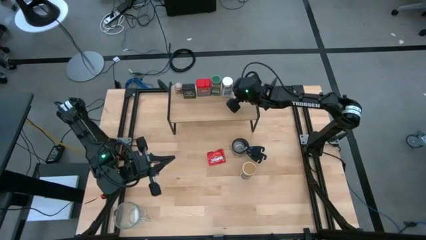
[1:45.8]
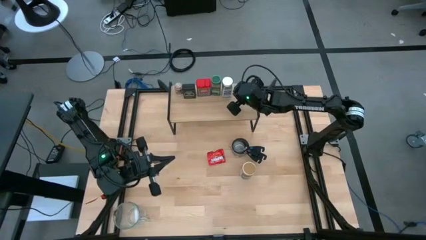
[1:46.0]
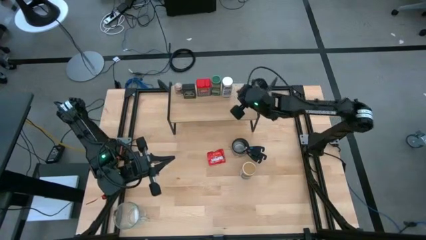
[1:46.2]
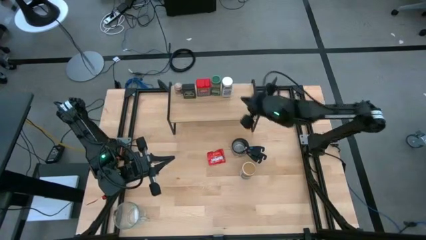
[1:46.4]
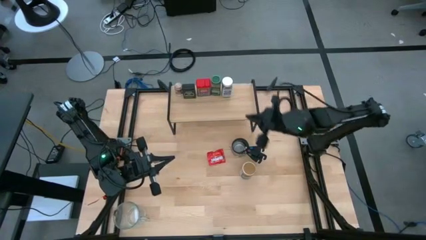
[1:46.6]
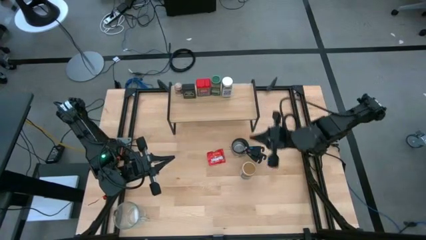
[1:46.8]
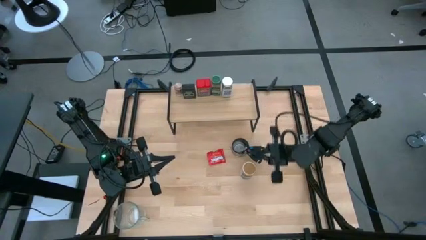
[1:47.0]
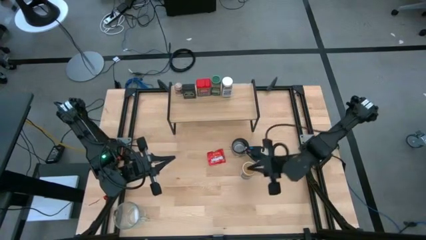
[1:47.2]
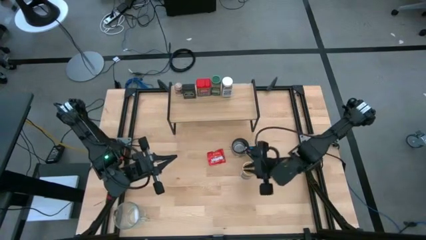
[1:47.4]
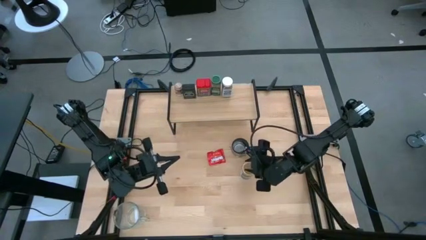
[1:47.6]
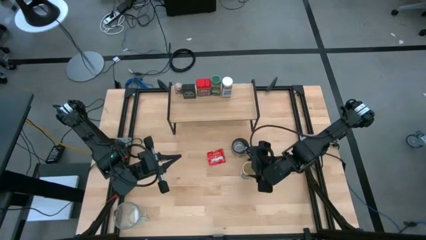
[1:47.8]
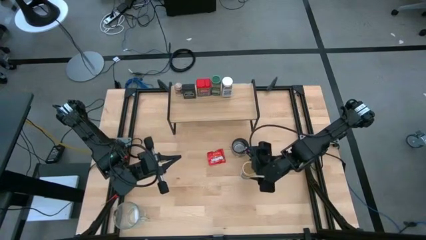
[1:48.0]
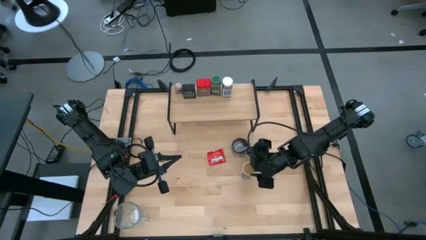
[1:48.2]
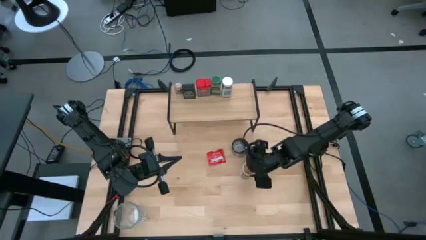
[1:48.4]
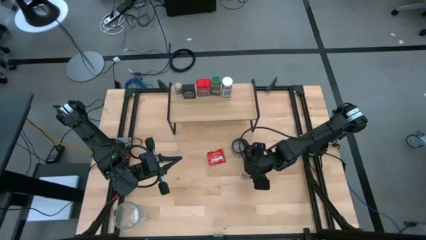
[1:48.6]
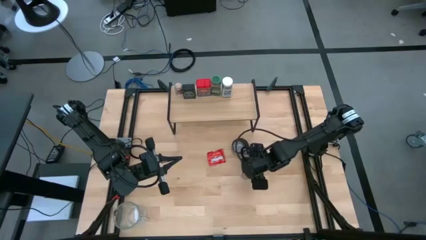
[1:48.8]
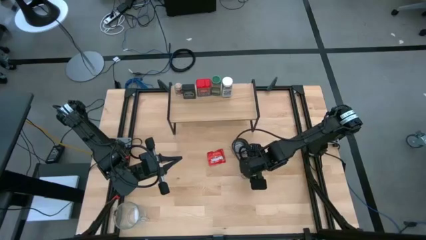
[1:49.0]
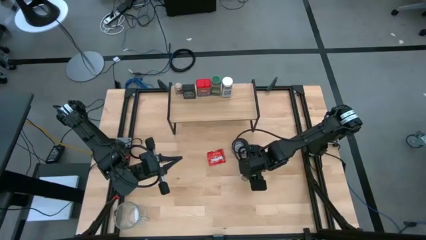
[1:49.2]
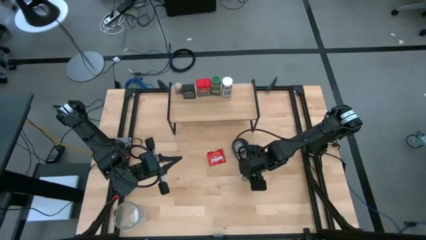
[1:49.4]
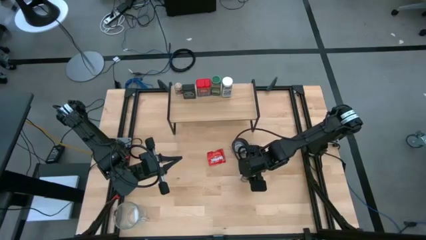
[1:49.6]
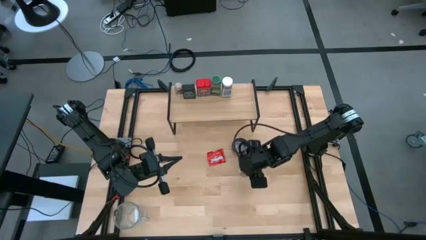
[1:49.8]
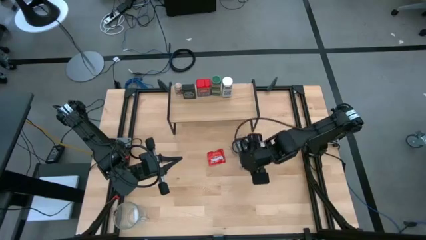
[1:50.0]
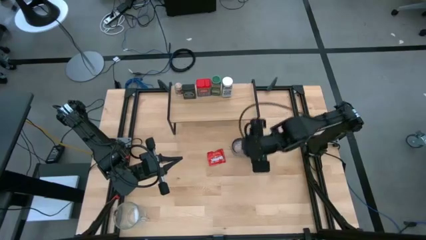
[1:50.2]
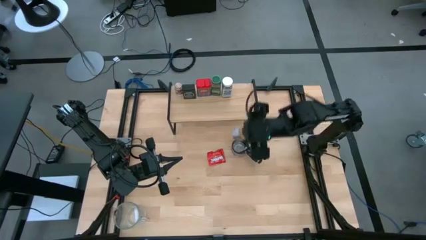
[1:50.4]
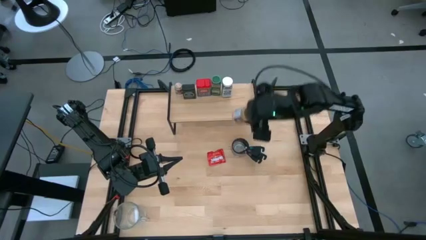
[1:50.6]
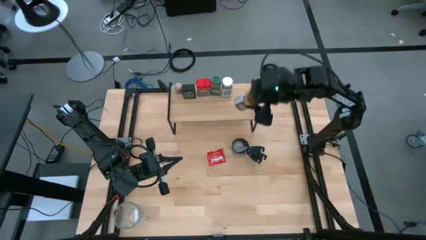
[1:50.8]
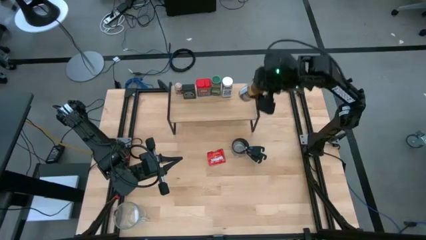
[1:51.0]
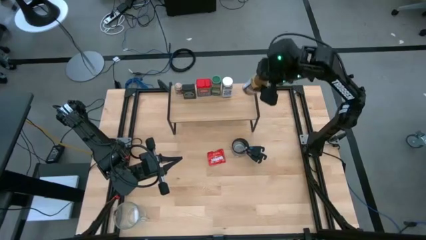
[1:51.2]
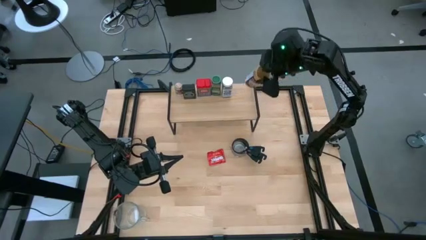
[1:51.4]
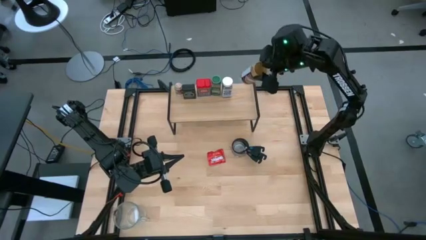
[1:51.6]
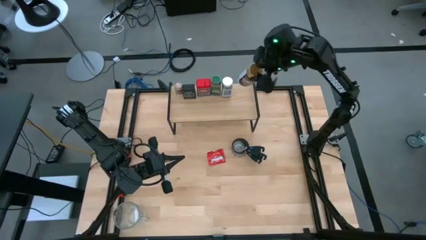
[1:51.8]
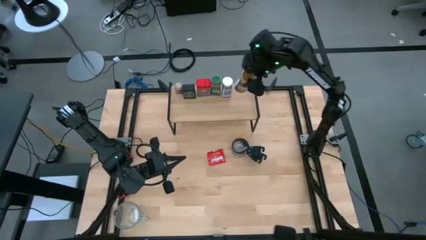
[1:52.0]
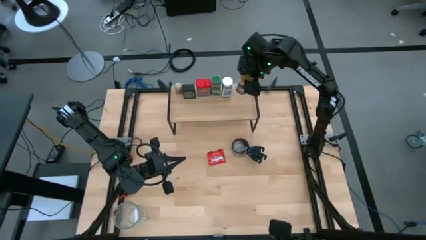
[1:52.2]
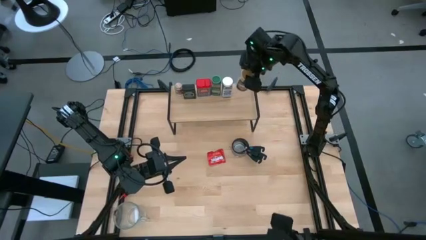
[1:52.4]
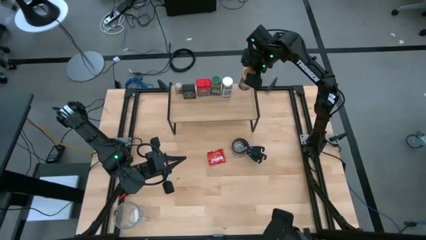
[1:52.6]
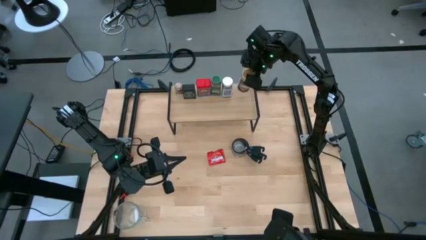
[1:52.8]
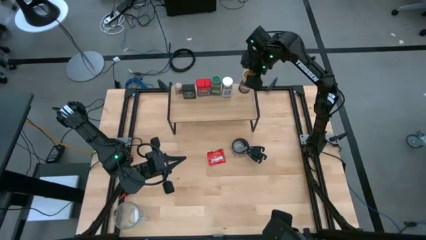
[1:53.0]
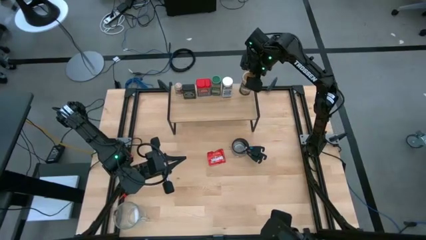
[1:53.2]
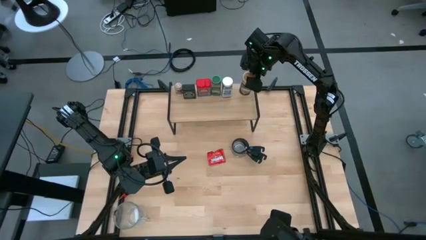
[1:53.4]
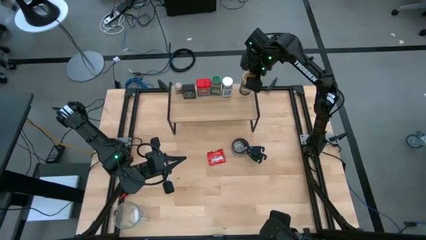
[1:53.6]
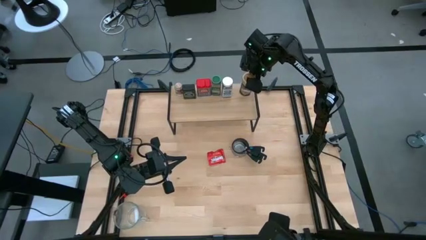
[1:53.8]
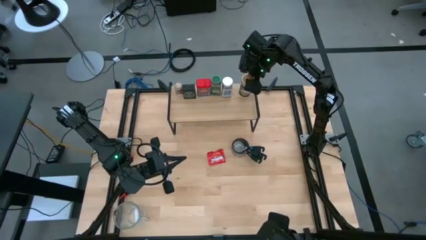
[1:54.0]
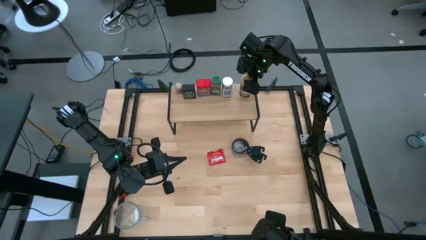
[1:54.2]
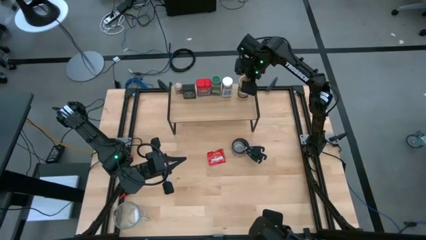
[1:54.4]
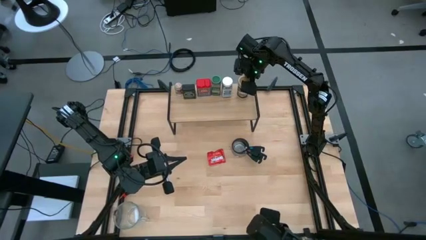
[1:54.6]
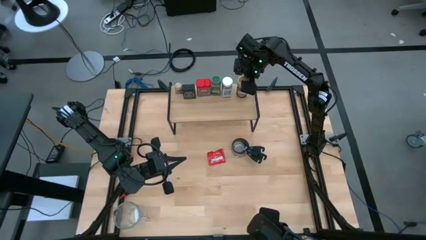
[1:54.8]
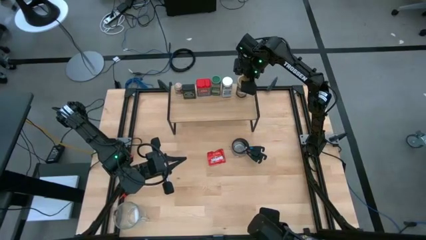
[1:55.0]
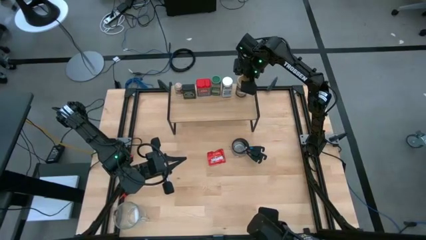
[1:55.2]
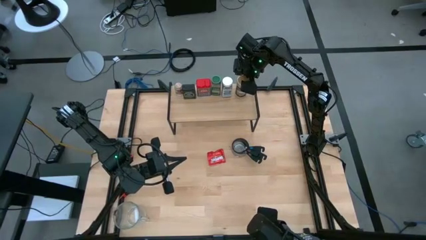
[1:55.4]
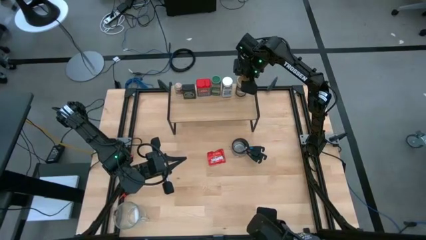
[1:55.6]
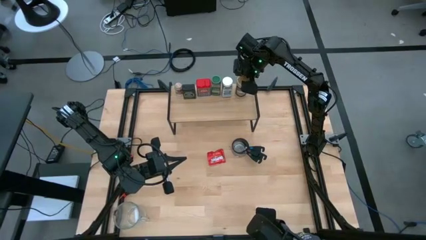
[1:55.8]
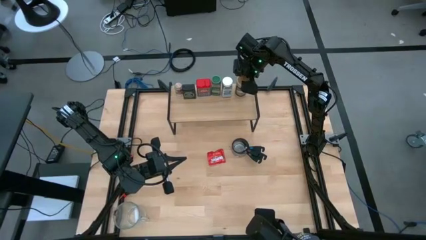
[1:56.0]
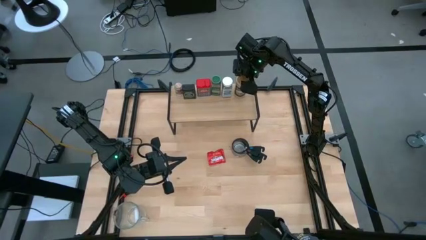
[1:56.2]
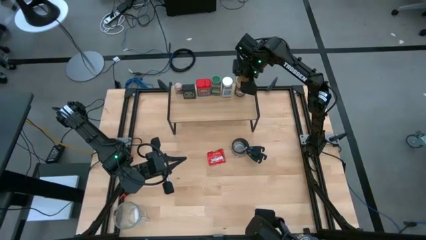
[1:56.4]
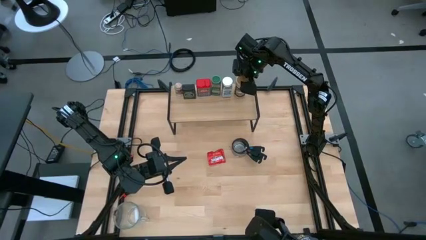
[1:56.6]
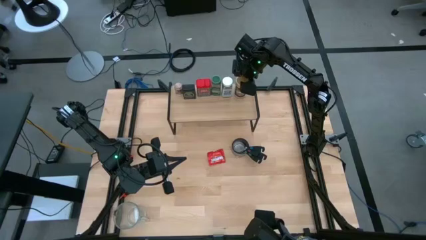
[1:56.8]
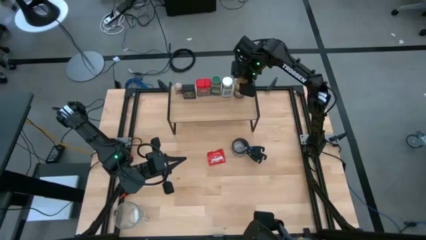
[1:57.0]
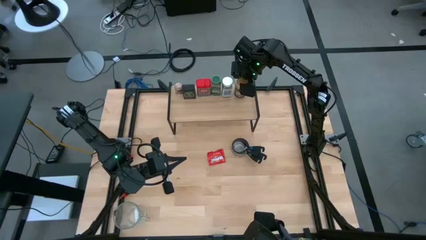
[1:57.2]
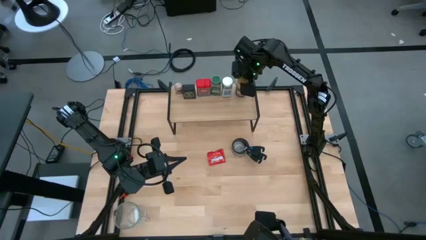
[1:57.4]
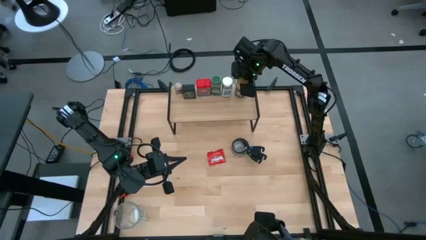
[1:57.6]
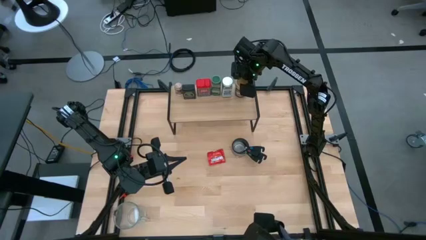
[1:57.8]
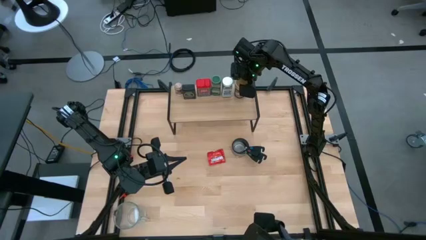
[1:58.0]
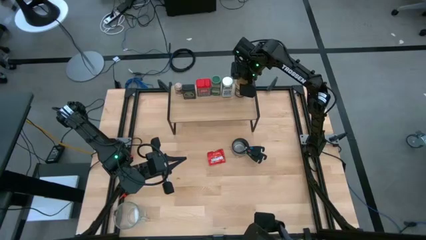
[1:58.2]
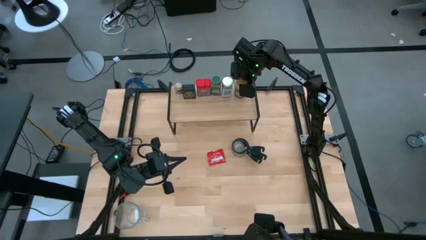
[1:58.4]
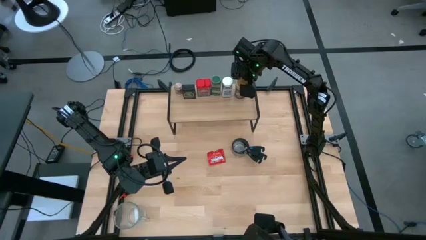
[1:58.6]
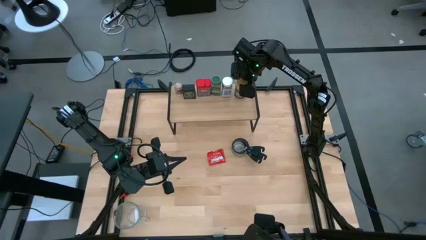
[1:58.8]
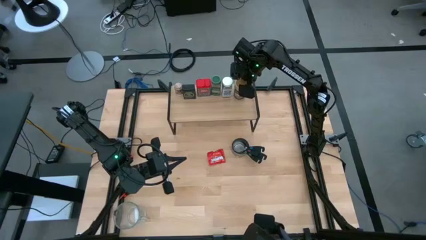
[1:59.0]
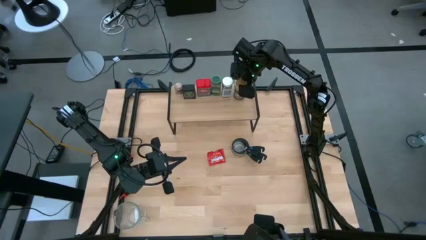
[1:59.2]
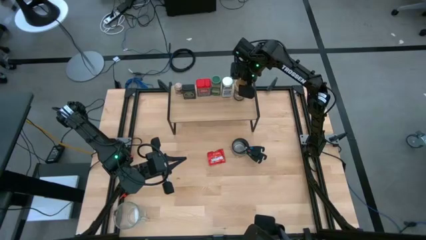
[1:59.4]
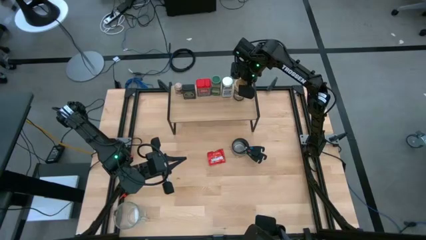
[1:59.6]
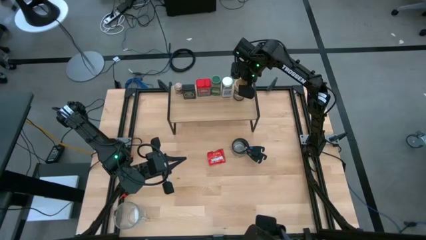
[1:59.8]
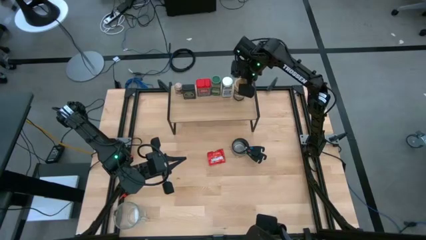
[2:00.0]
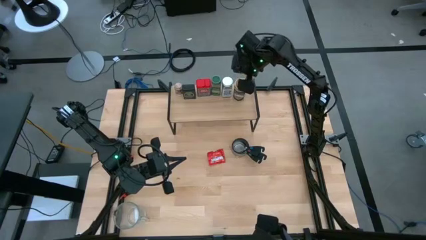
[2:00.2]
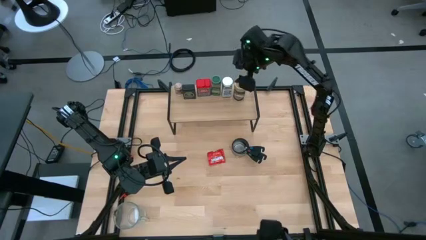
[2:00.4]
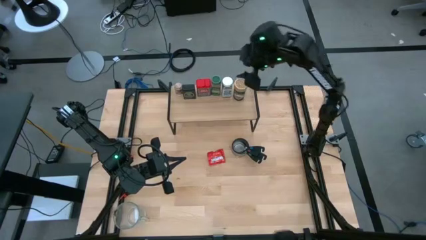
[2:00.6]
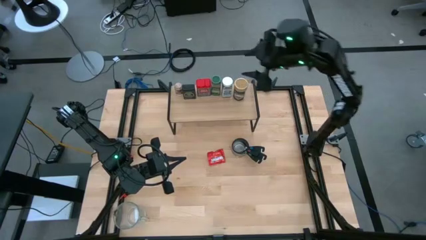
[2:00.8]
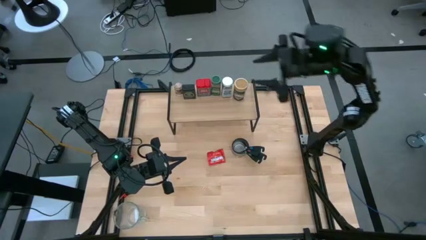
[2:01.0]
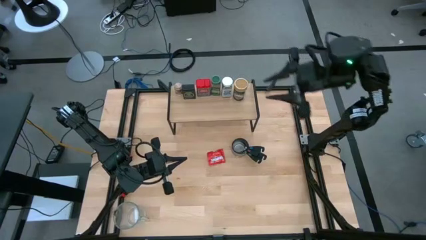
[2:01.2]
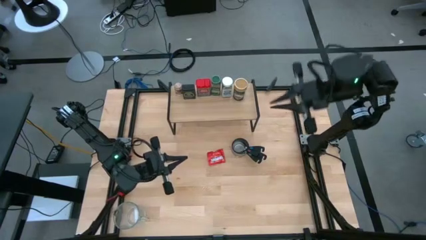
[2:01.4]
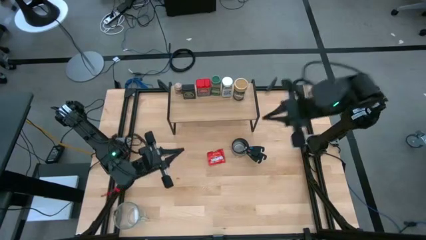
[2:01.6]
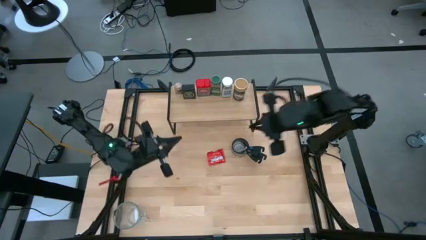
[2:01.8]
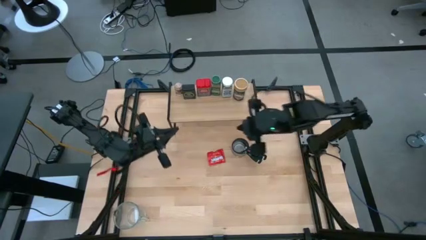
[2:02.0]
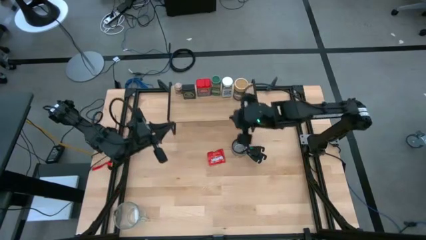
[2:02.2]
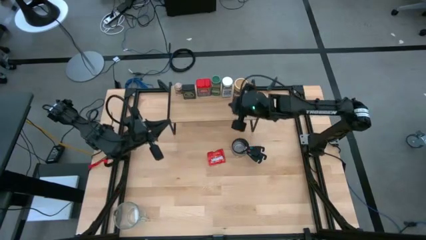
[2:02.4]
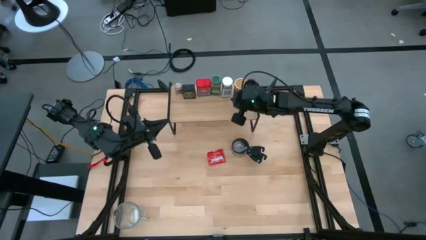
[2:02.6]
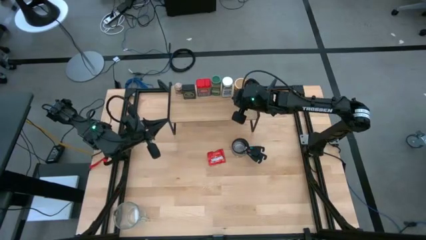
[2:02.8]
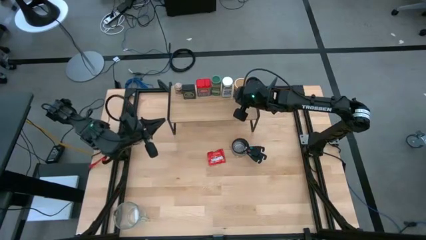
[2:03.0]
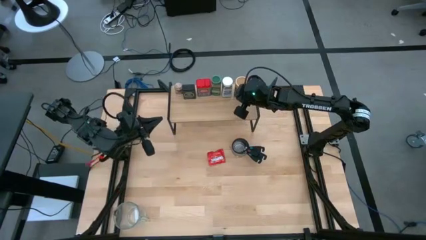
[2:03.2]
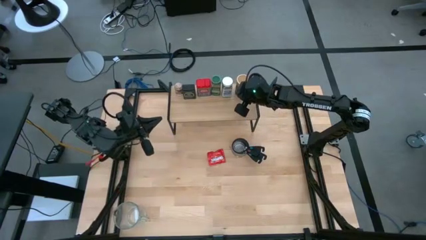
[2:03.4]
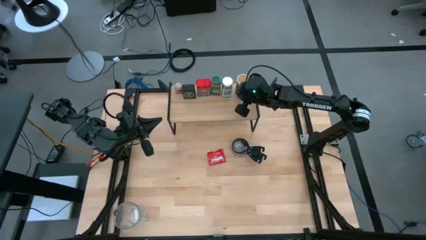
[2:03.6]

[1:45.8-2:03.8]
Task: Shelf spices
Put the gold seasoning bottle on the shelf
